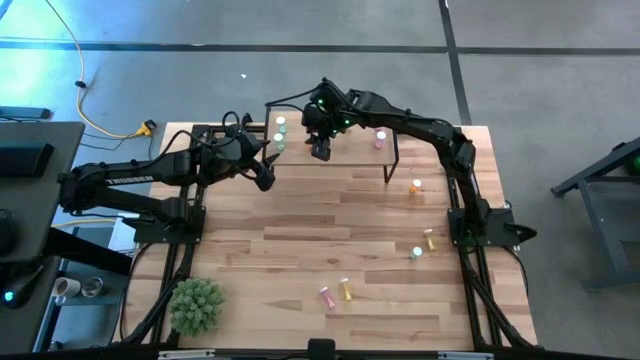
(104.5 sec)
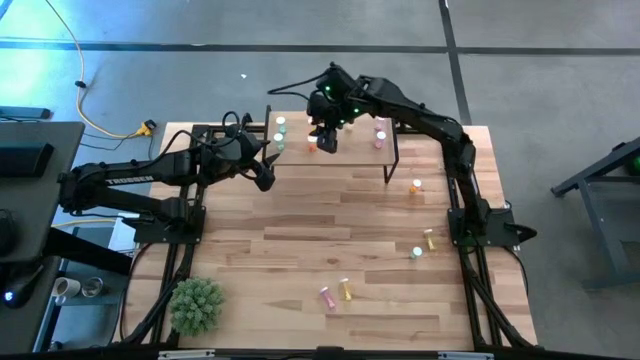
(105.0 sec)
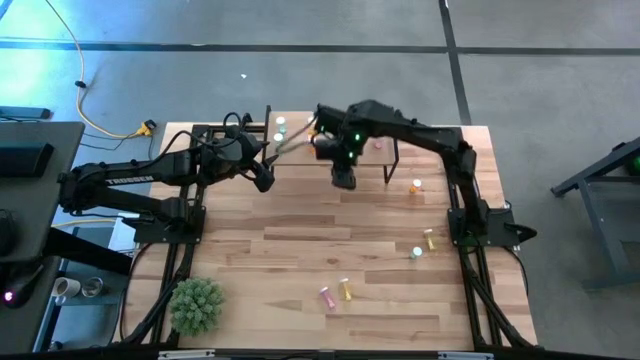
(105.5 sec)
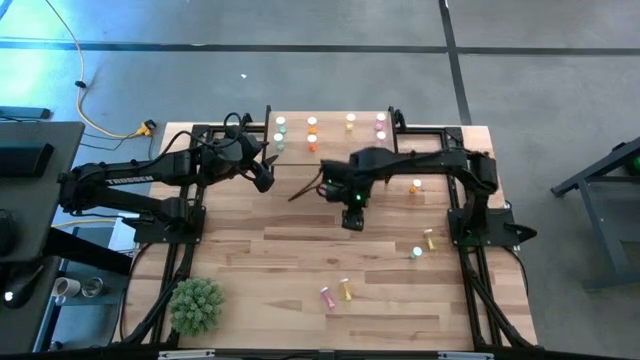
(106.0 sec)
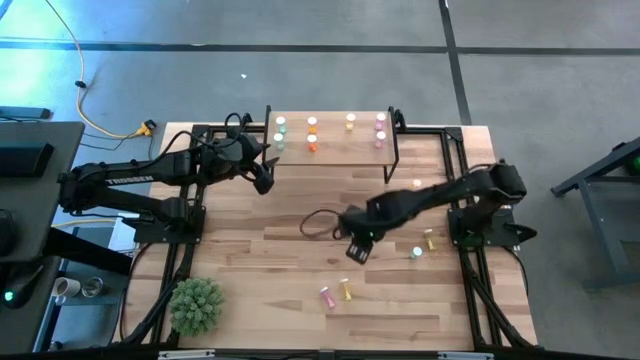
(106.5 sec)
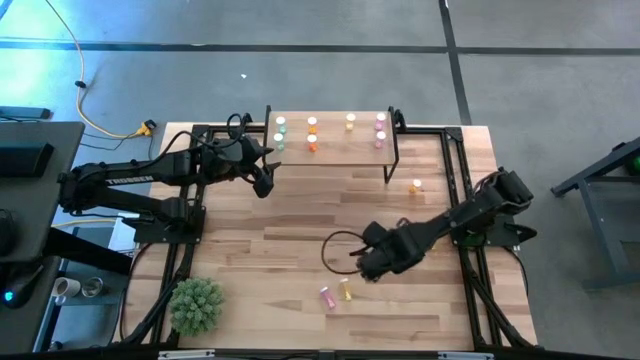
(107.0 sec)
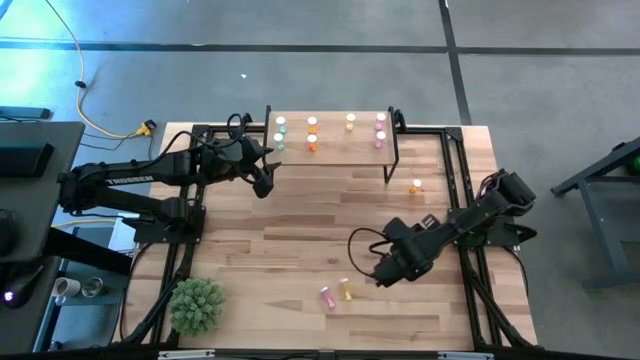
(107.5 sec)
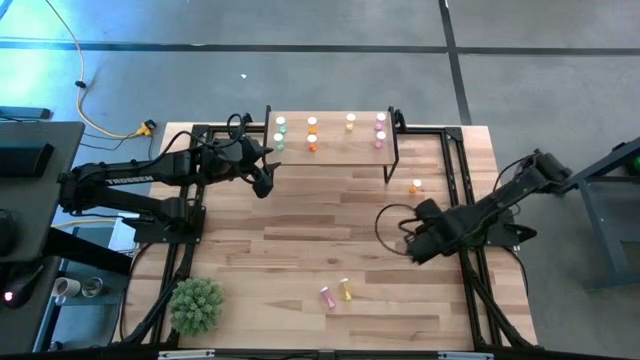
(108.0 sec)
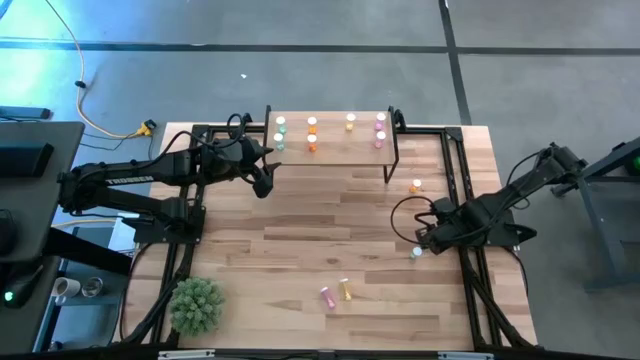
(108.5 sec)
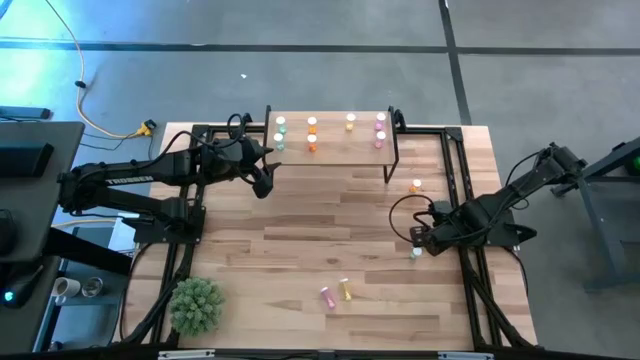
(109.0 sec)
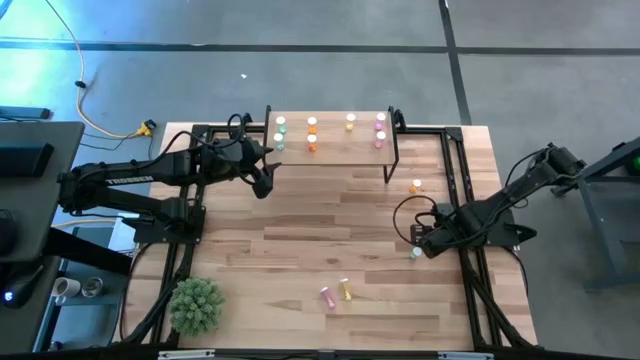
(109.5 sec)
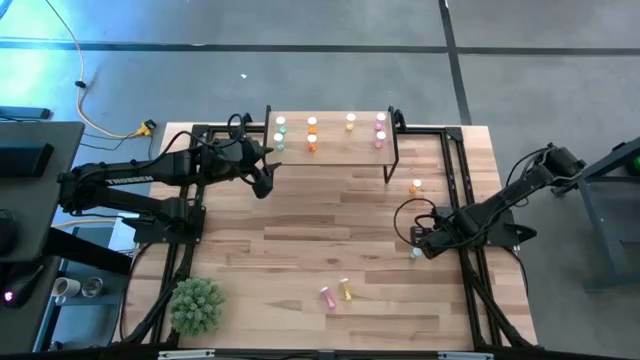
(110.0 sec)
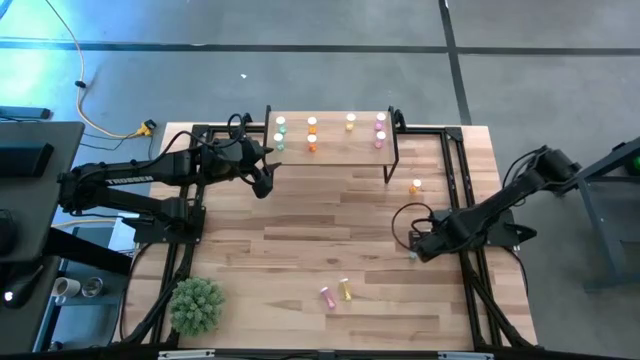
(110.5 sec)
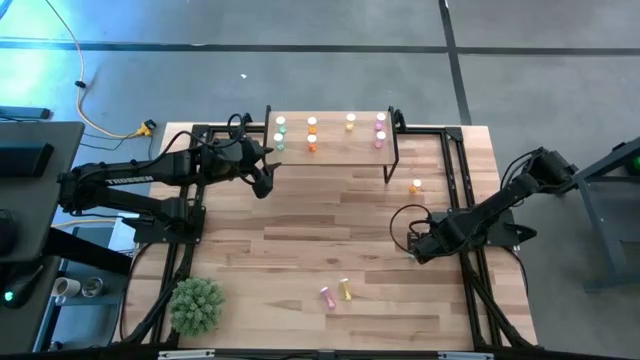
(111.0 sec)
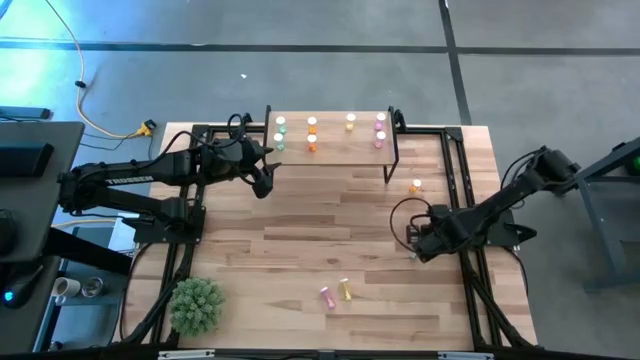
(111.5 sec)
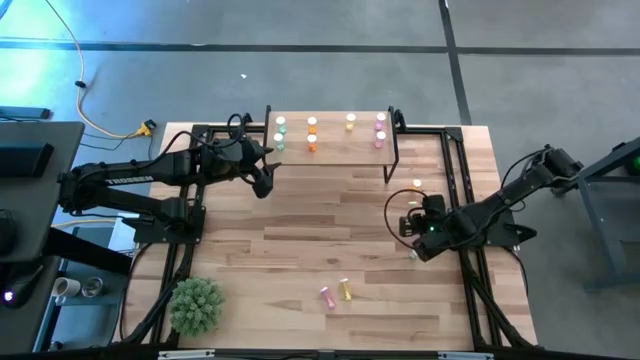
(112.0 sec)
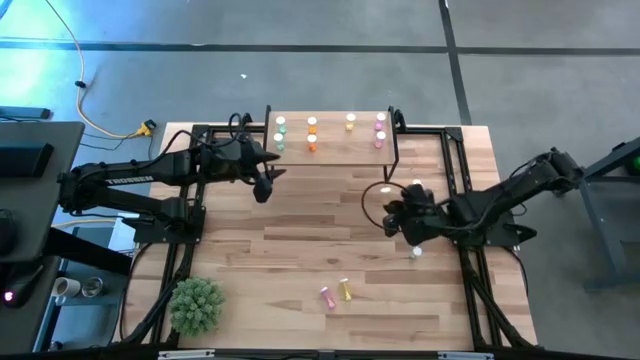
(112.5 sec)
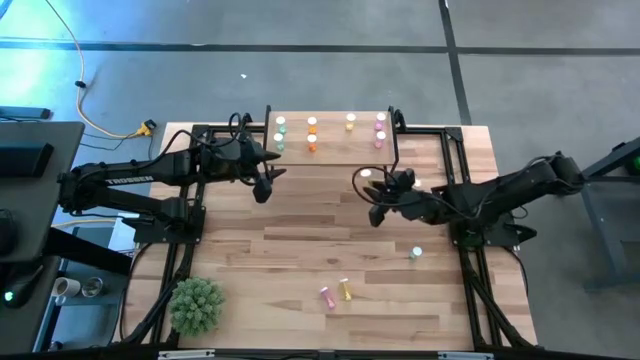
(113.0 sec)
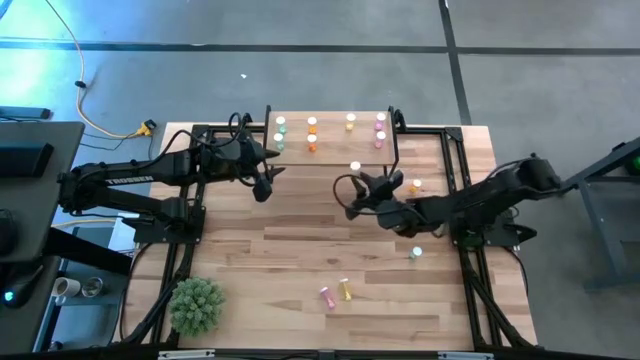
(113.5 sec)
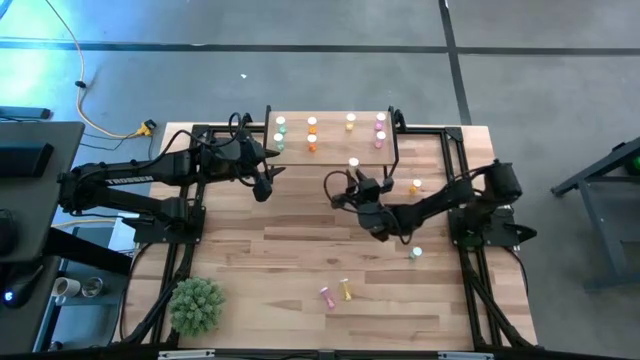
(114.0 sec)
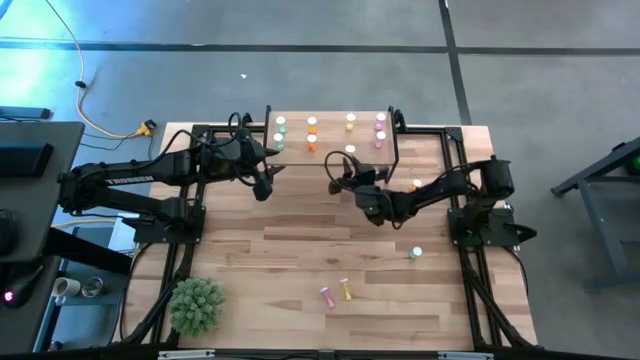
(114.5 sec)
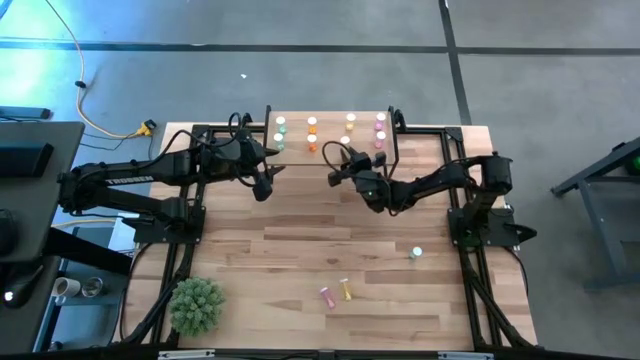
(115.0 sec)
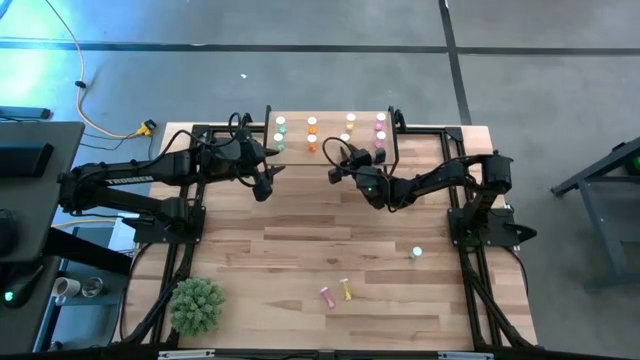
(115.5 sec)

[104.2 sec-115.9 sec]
Task: Pick and place medicine bottles onto shelf by color
Put the top yellow pill bottle on the shelf aligned with the other yellow pill bottle

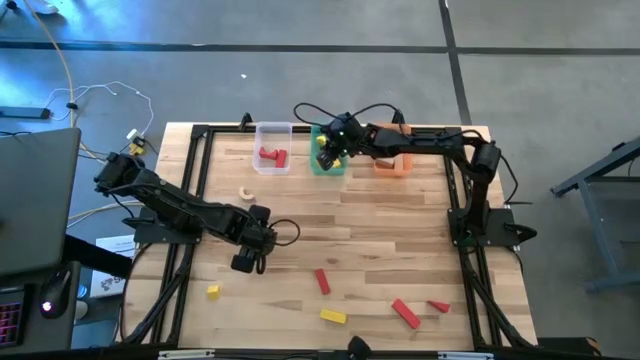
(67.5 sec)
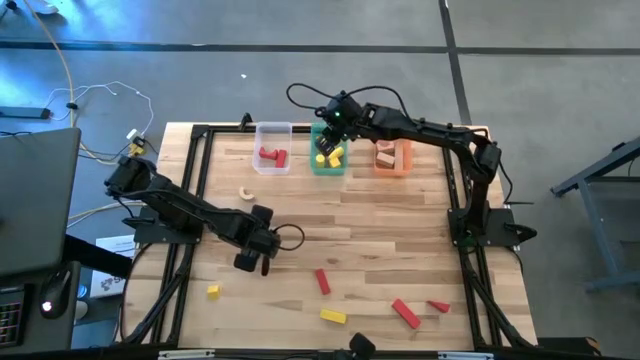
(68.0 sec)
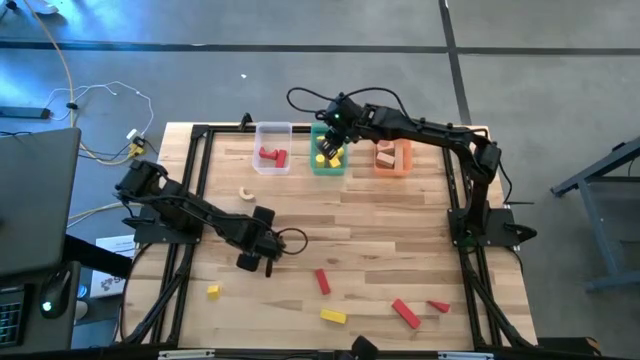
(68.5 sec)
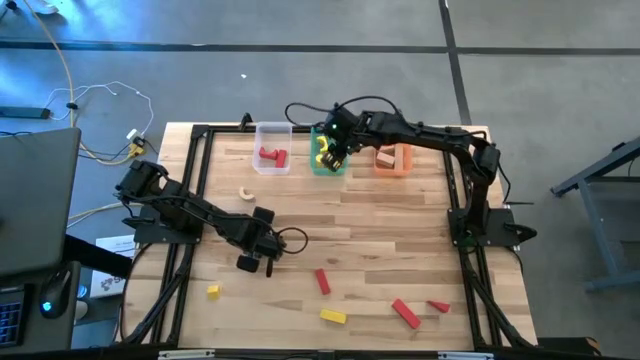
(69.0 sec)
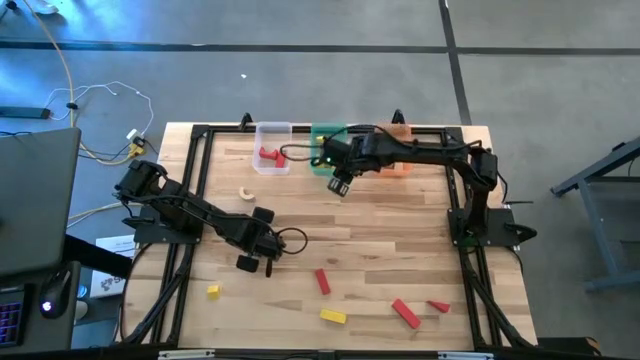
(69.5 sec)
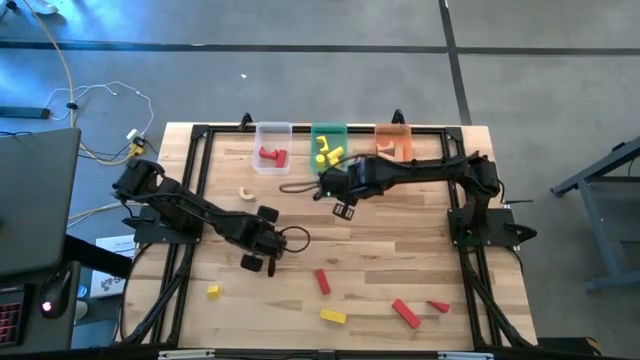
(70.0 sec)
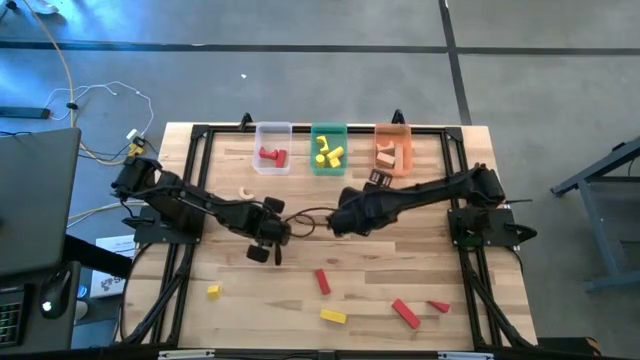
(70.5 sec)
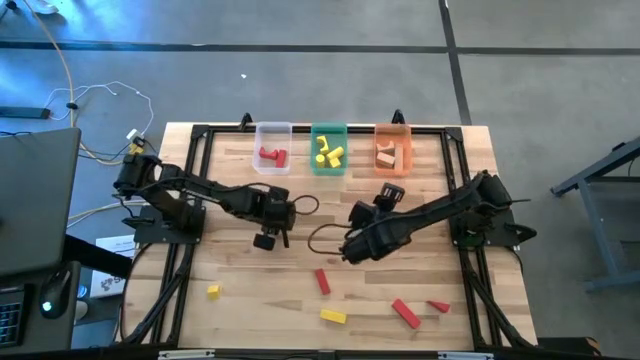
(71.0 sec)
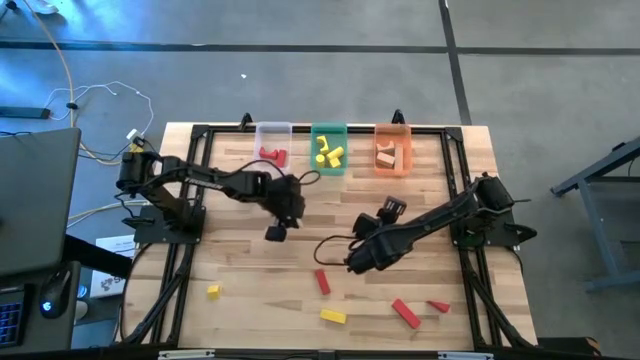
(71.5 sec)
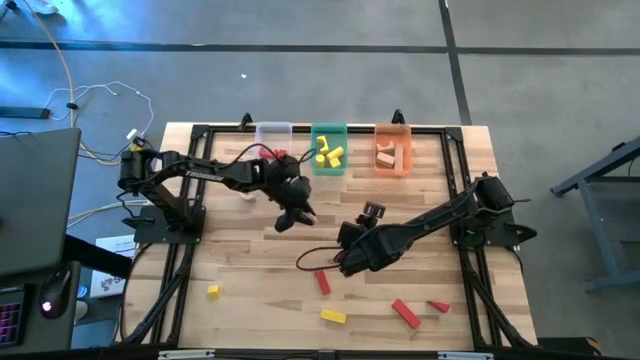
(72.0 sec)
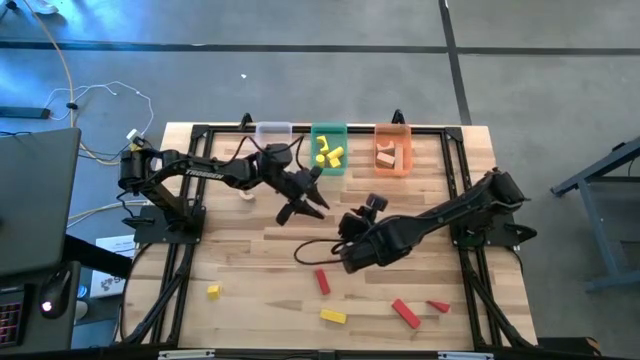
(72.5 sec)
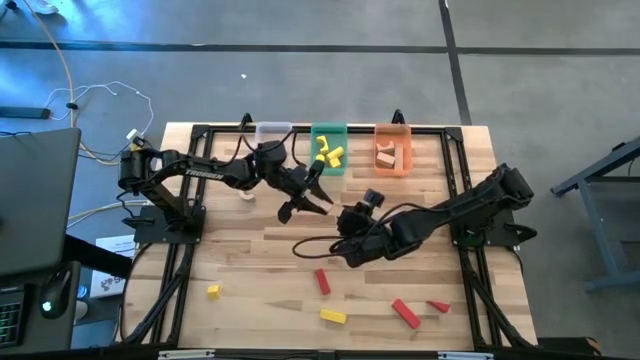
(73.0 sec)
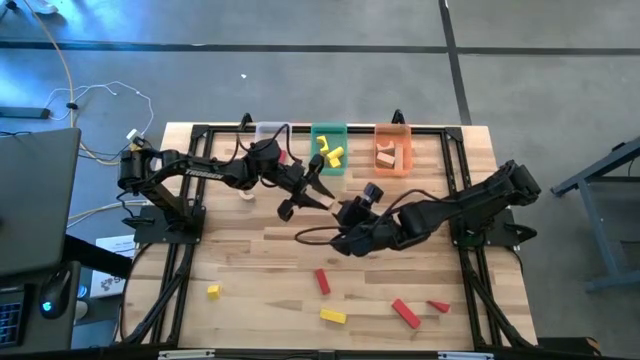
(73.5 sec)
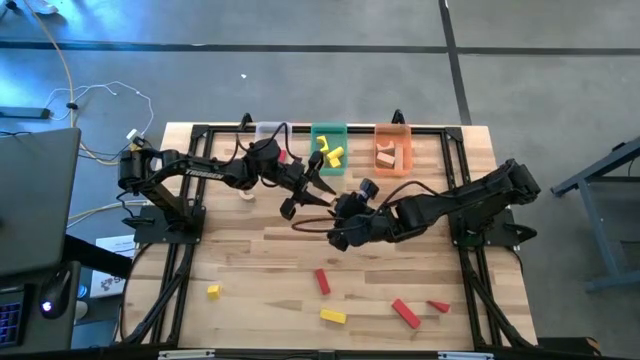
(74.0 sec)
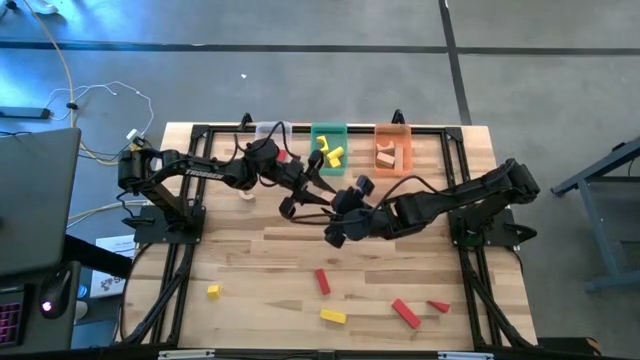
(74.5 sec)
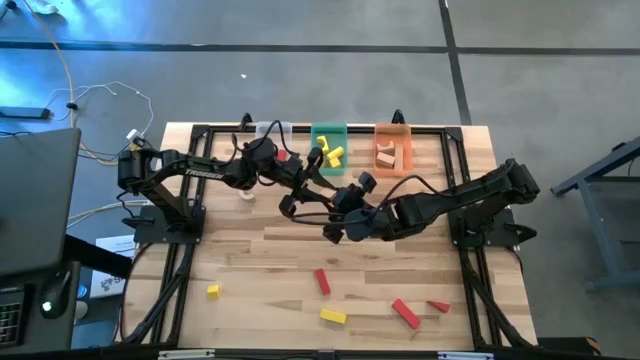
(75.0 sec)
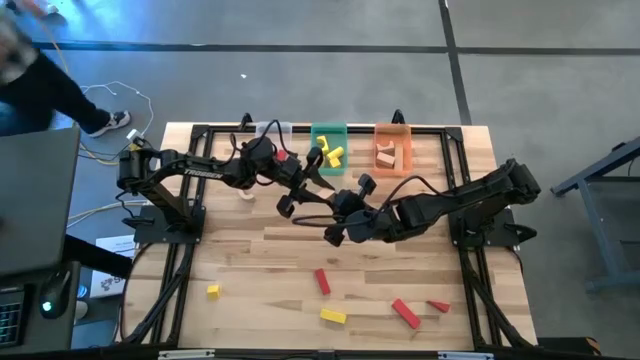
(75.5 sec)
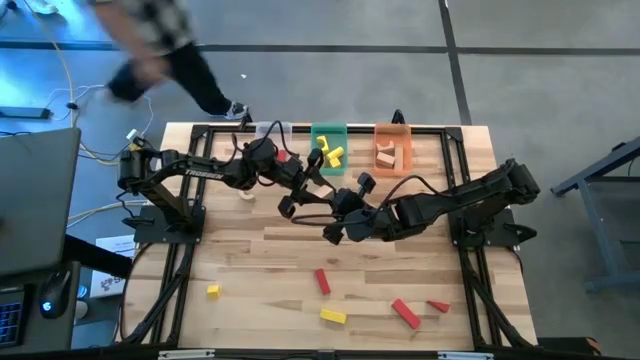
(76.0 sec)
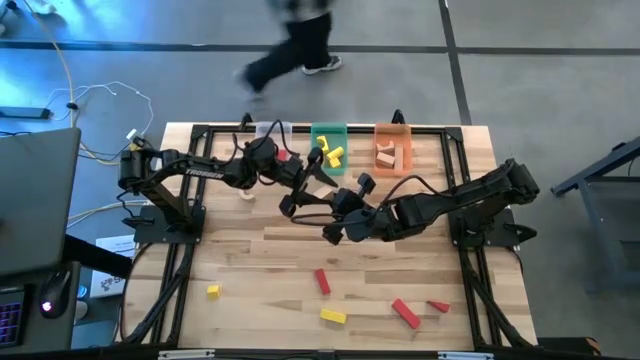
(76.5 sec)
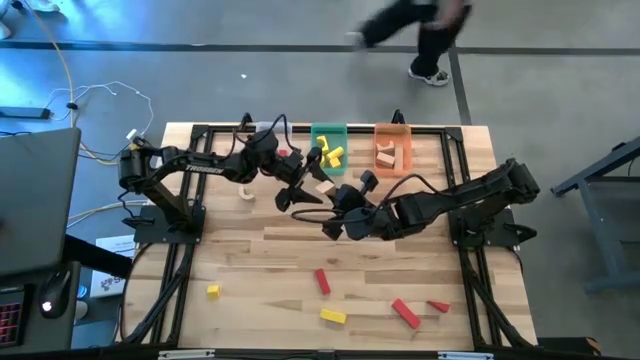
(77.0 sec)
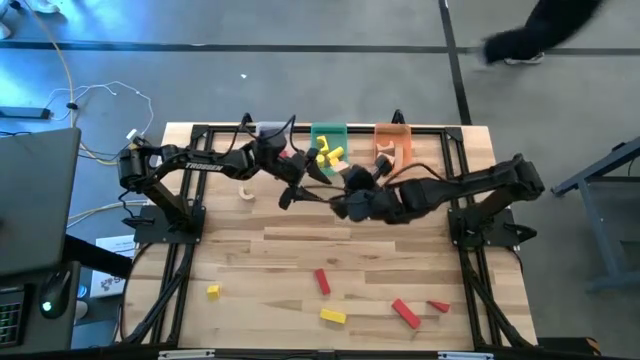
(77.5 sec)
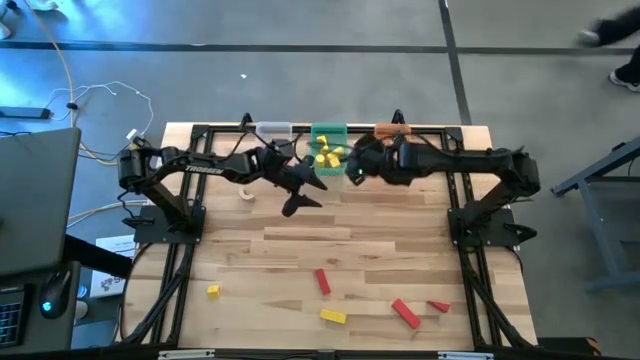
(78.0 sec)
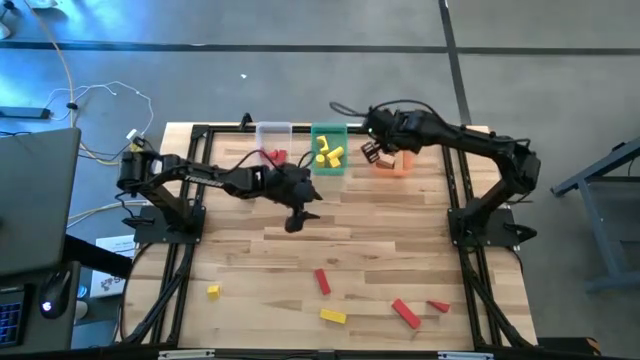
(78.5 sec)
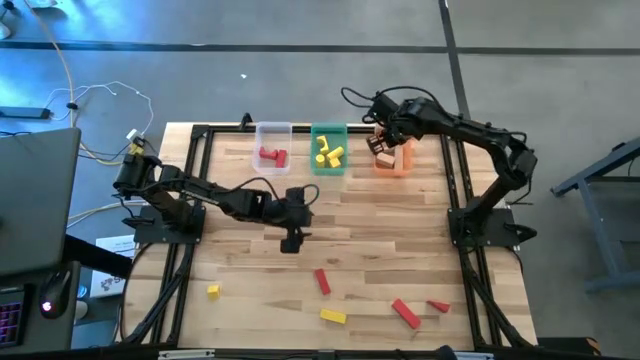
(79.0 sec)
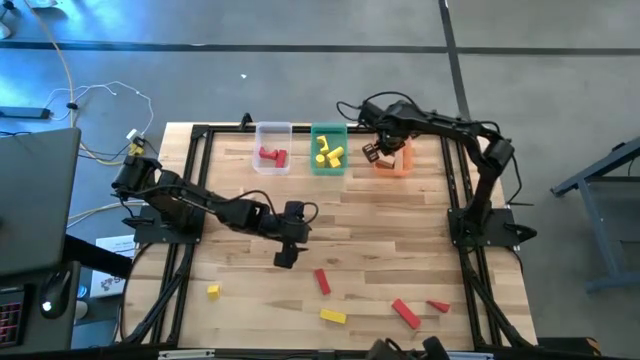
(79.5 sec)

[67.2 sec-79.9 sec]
Task: Sort & place blocks by color
Put the brown block into the orange bin
